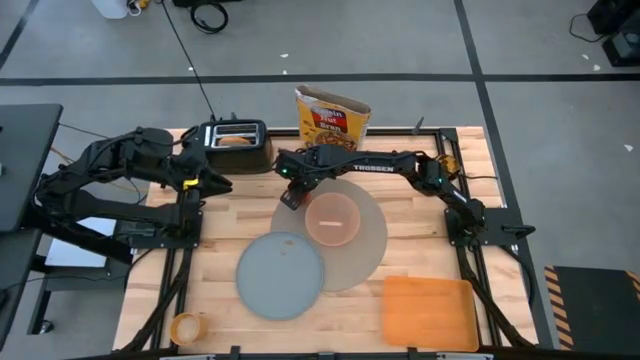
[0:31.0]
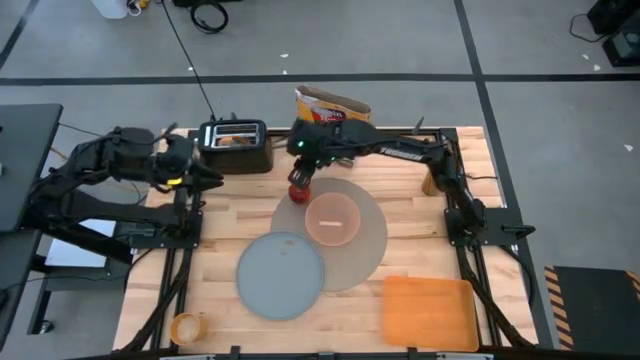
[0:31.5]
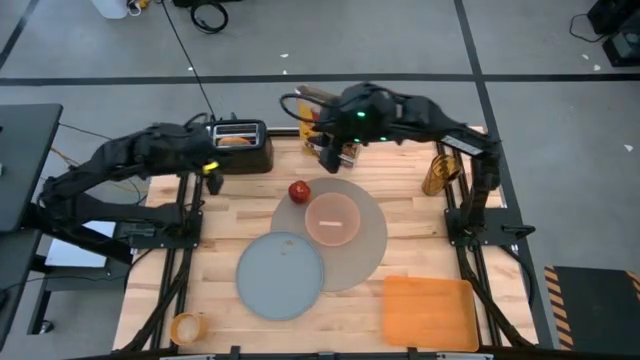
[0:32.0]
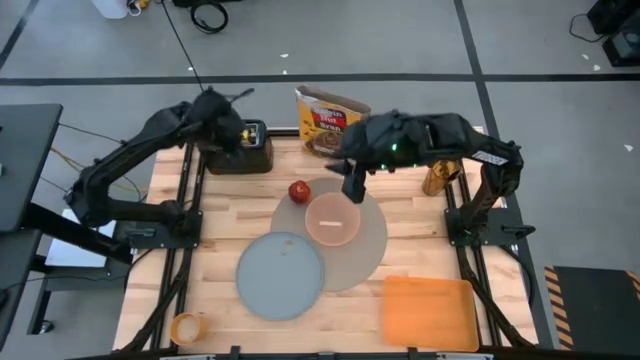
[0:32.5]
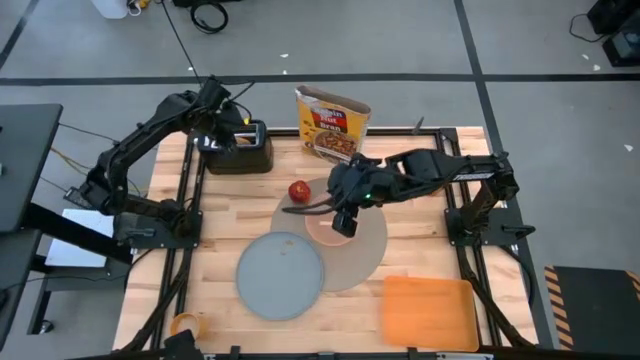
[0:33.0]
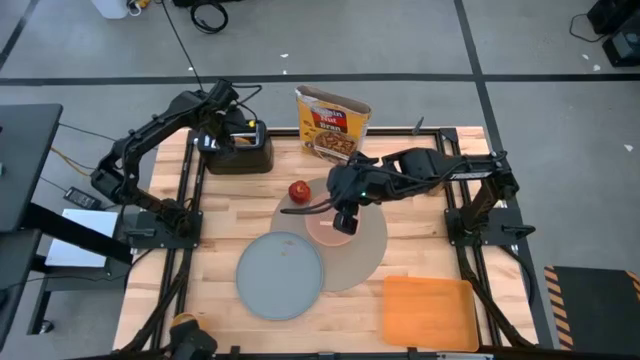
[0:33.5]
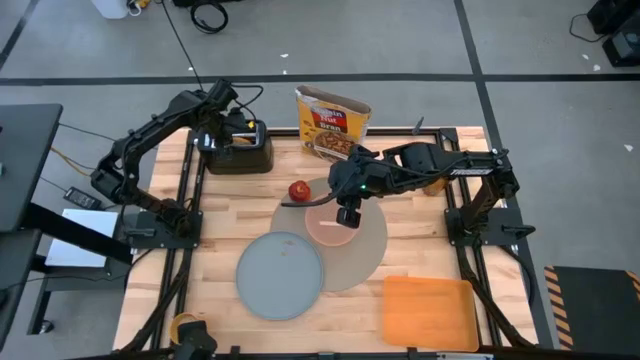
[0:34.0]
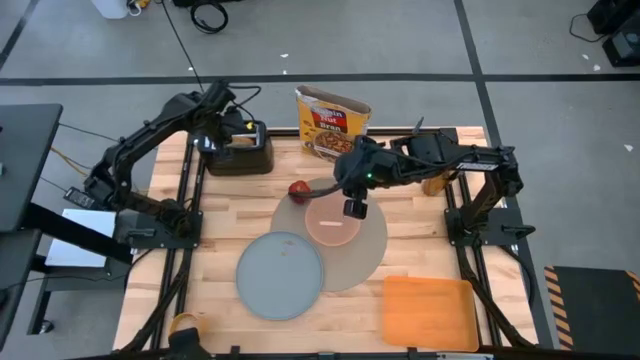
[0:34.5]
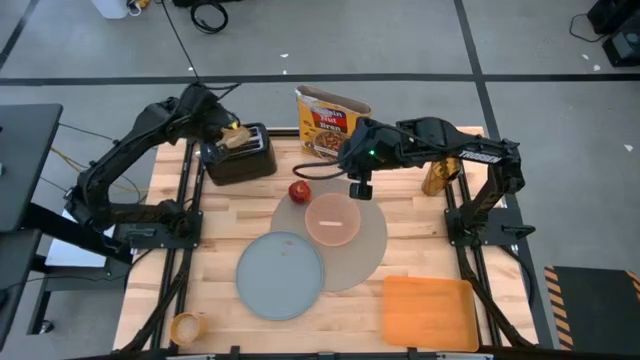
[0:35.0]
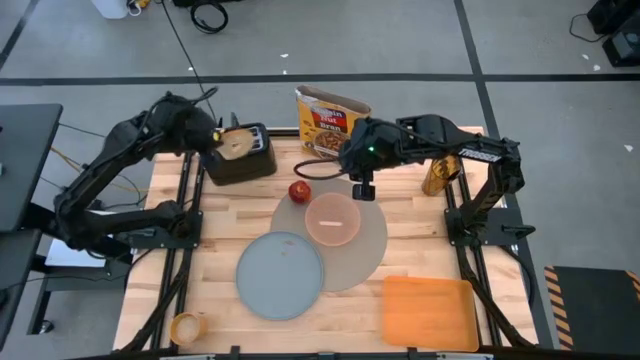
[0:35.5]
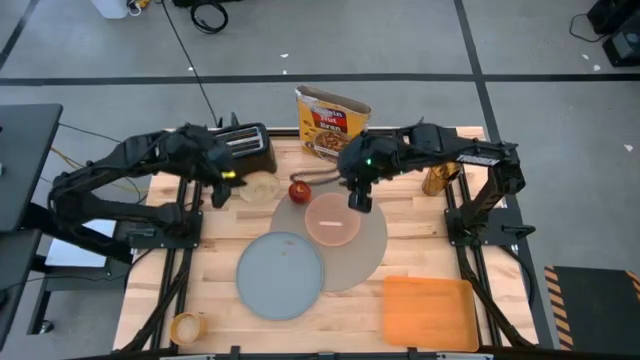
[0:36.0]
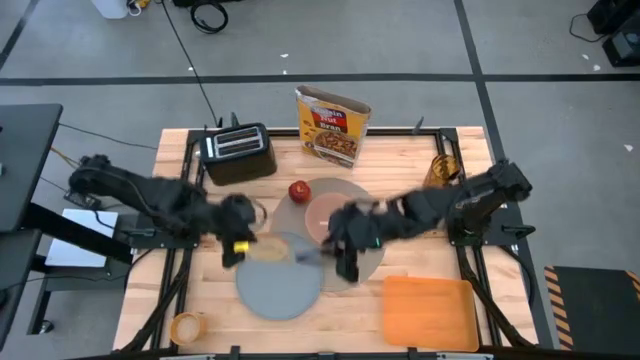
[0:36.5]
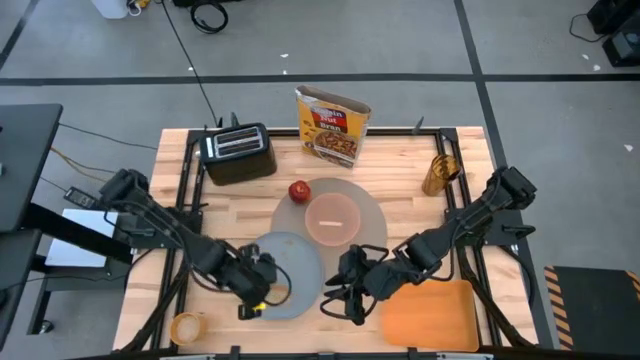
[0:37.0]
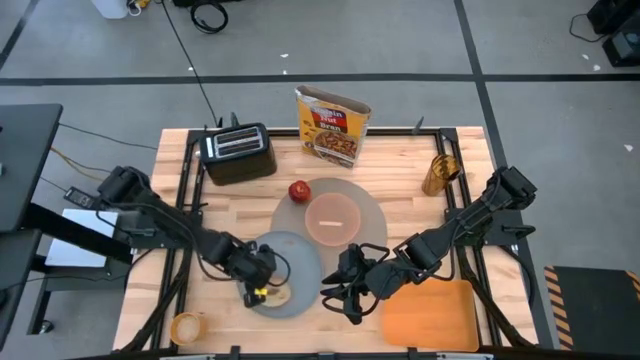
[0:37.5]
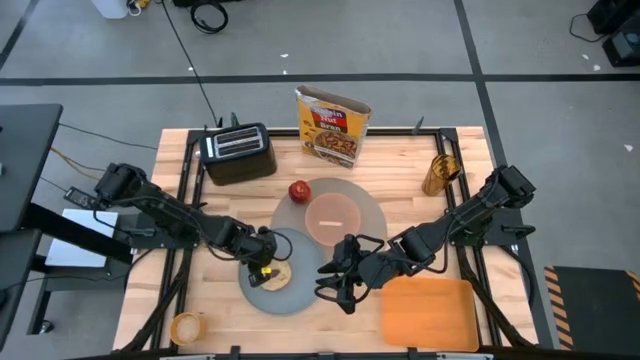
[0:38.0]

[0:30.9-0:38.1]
Task: Arrange a breakfast setting
Put the bagel on the blue plate

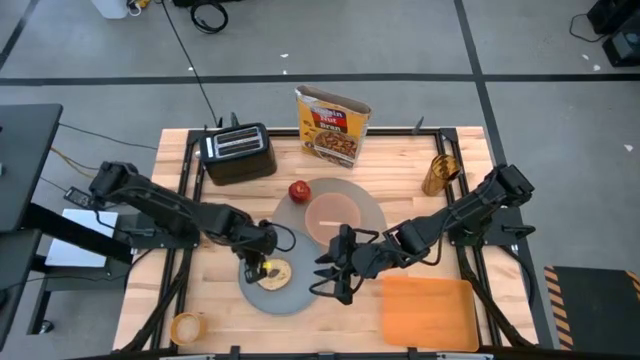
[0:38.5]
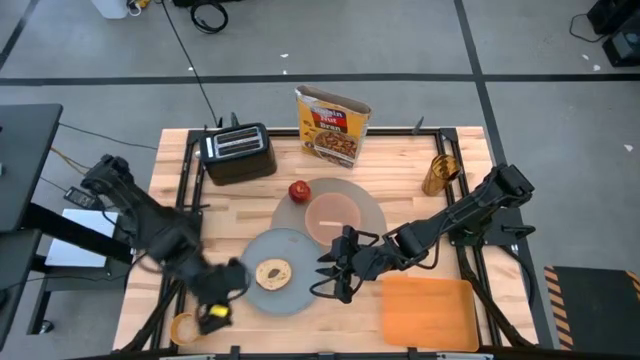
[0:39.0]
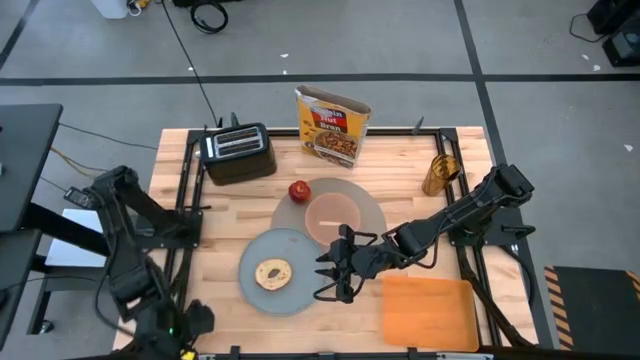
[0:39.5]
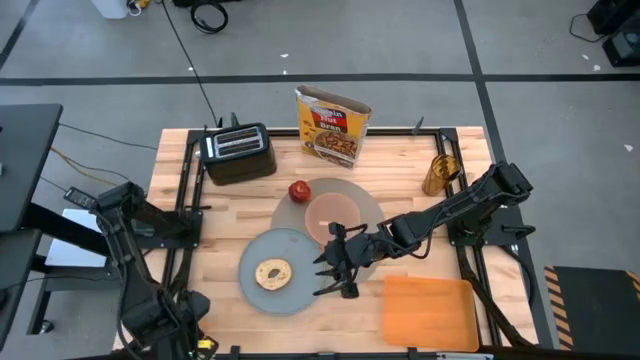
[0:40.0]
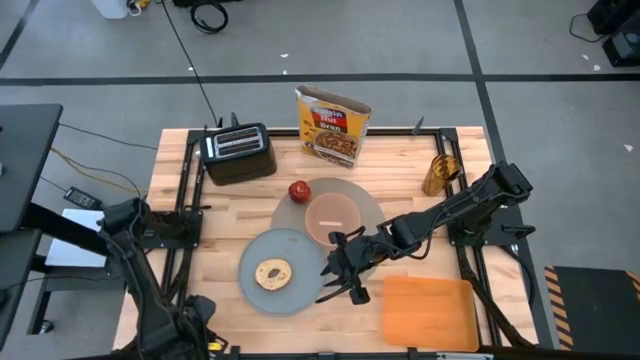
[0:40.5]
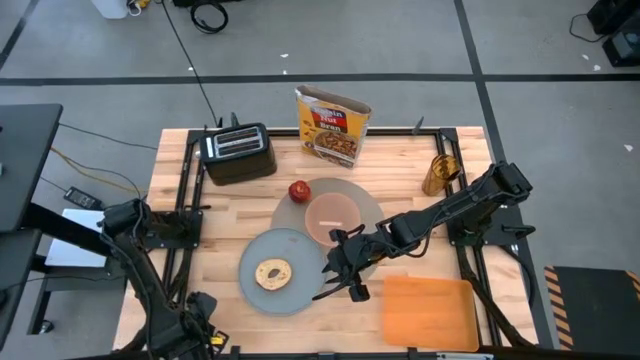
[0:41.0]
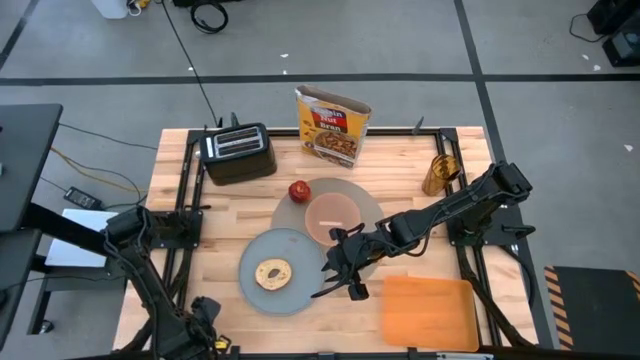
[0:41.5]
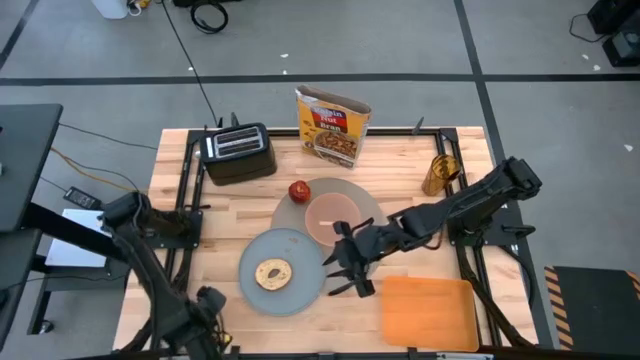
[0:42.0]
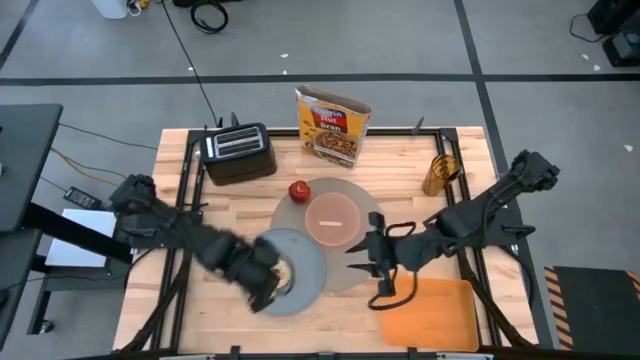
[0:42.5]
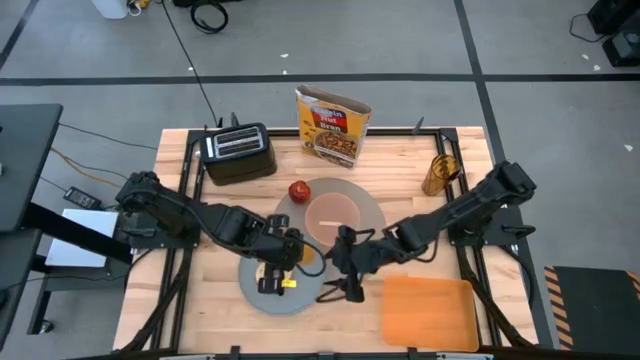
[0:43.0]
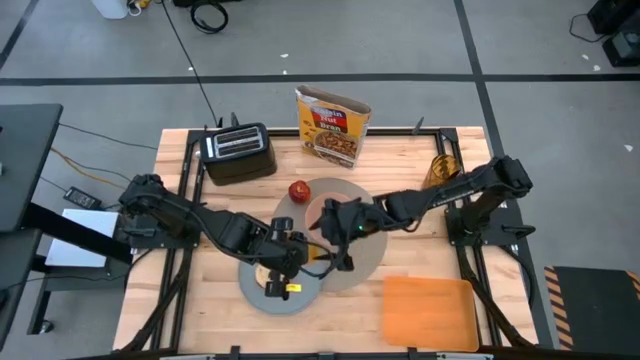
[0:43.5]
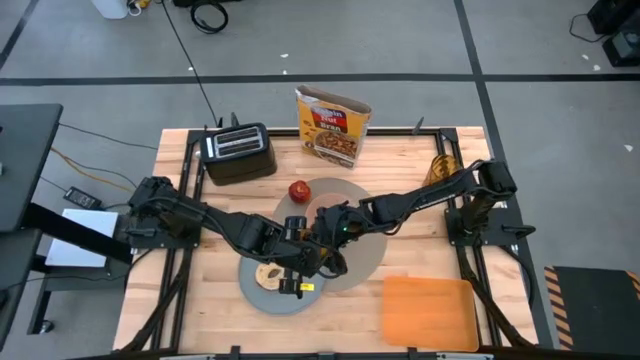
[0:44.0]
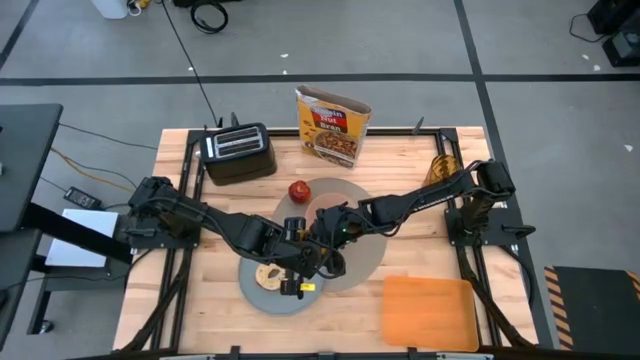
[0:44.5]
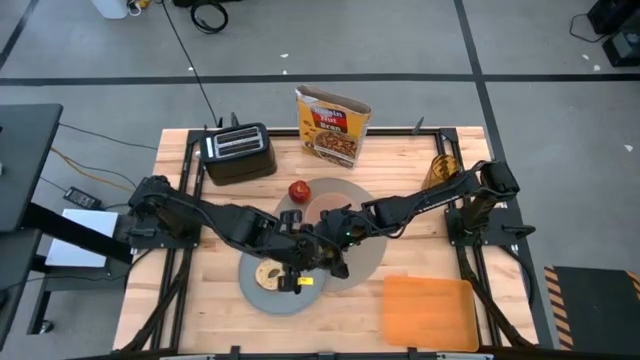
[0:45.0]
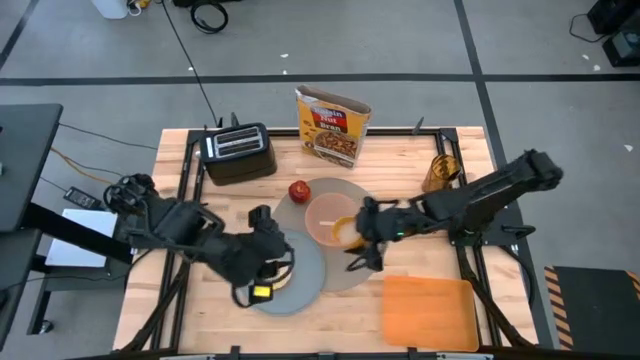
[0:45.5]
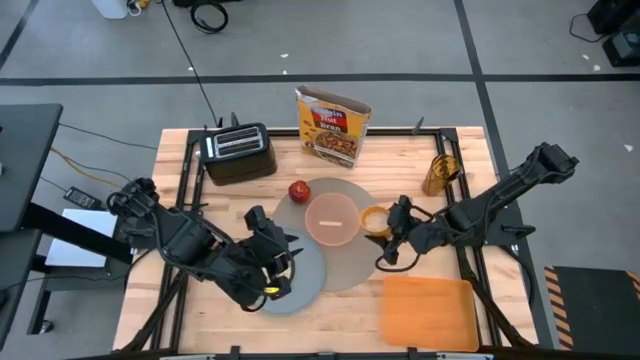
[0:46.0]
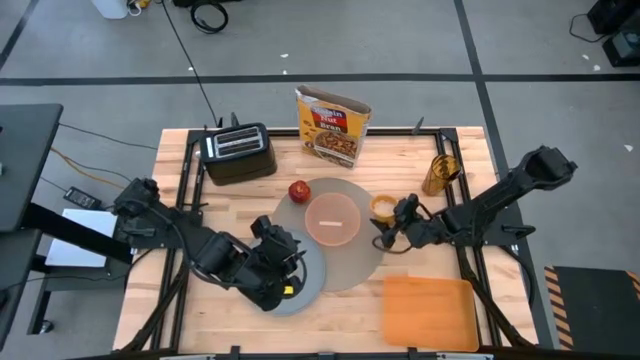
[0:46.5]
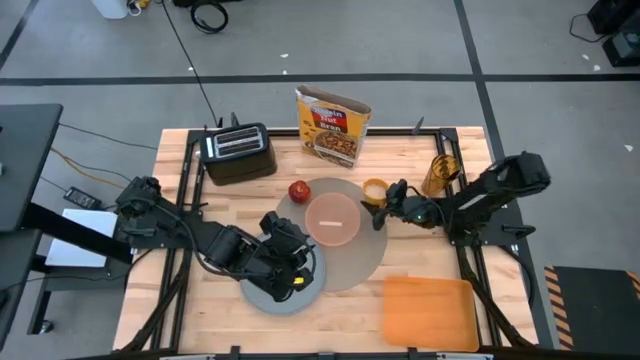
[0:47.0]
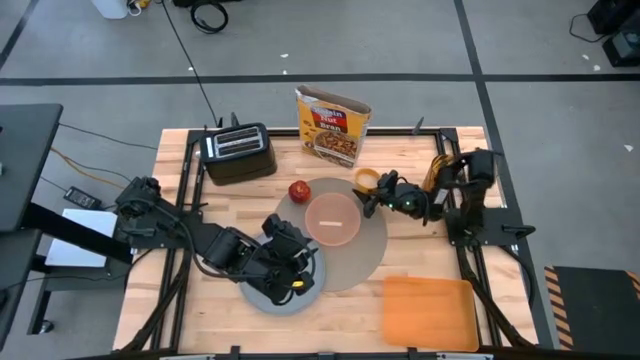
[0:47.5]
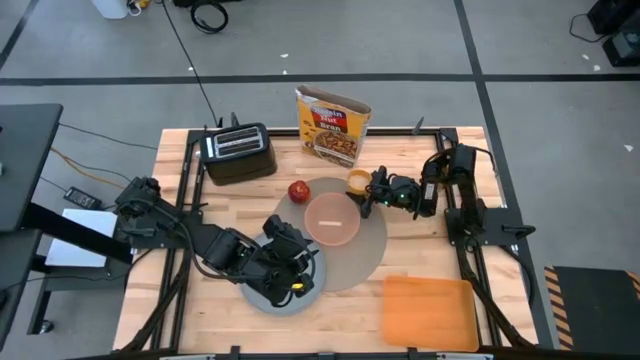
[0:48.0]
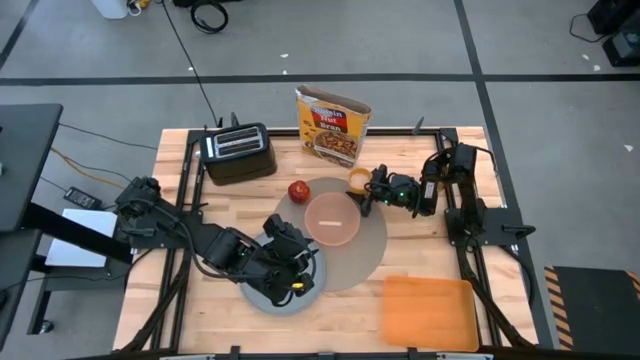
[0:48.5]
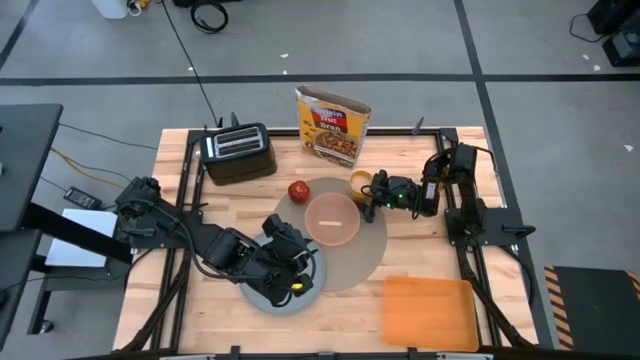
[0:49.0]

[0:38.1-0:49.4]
Put the orange cup on the gray placemat at the top right of the orange bowl

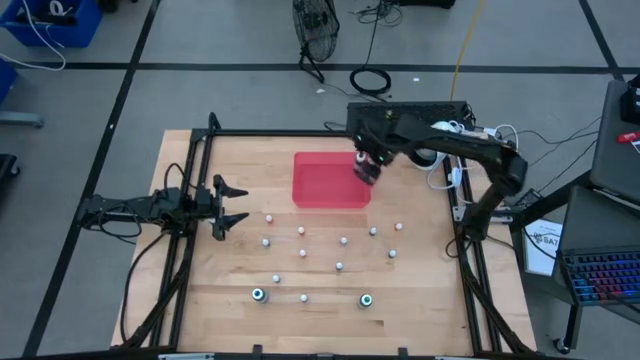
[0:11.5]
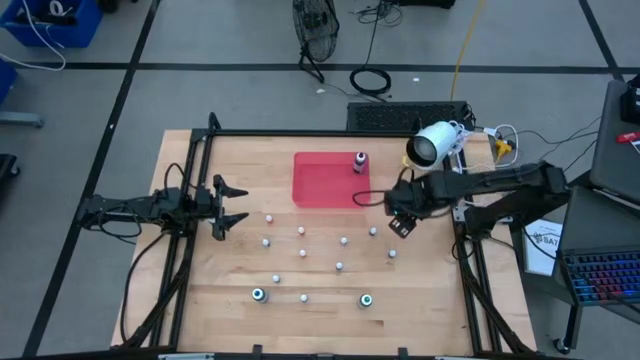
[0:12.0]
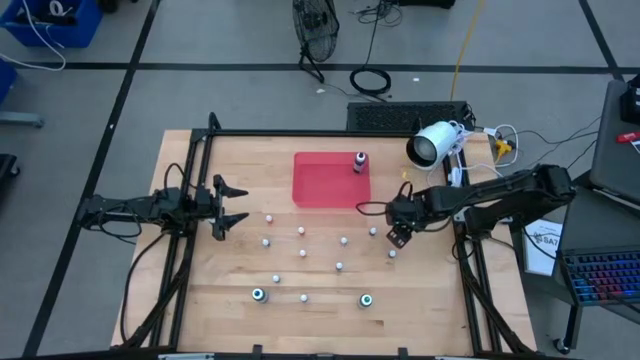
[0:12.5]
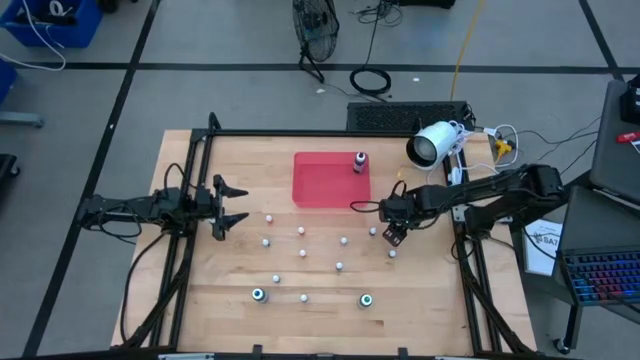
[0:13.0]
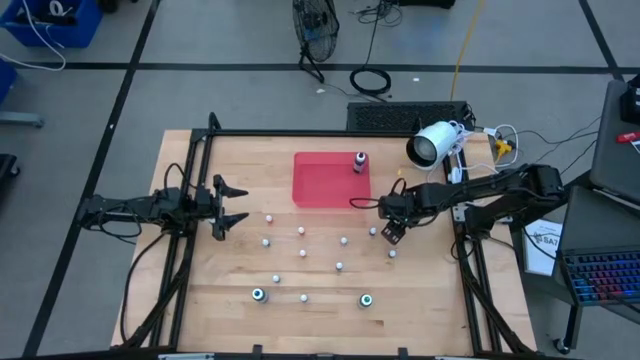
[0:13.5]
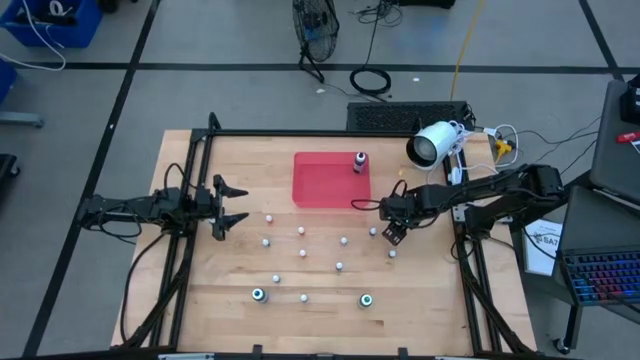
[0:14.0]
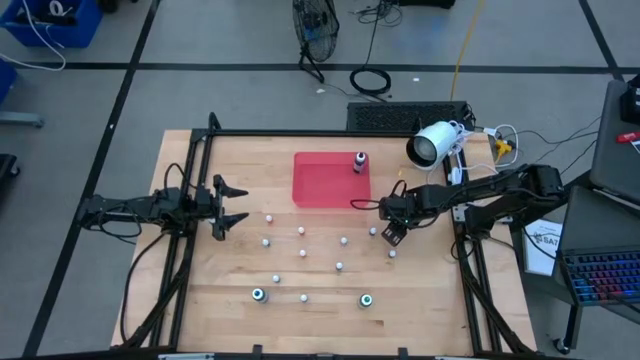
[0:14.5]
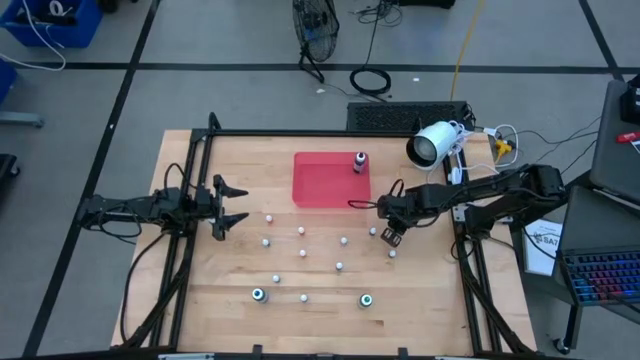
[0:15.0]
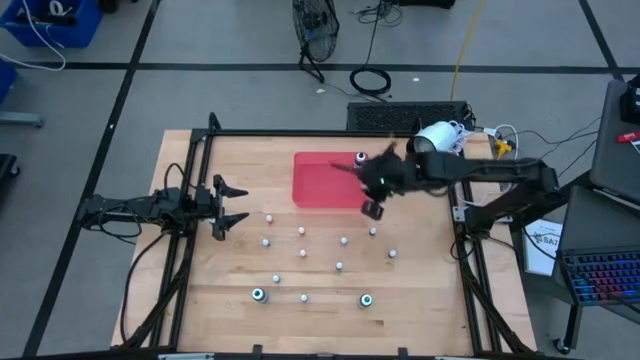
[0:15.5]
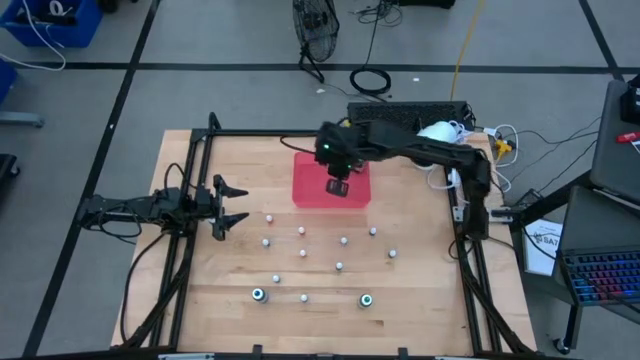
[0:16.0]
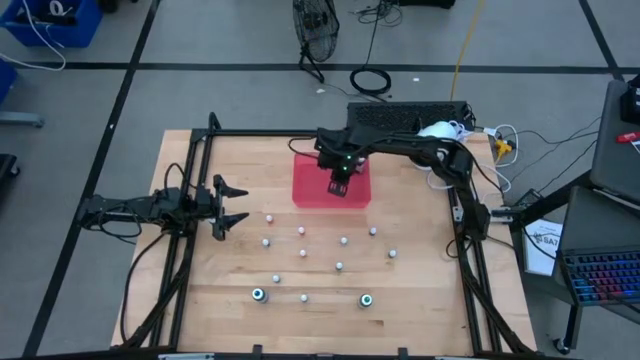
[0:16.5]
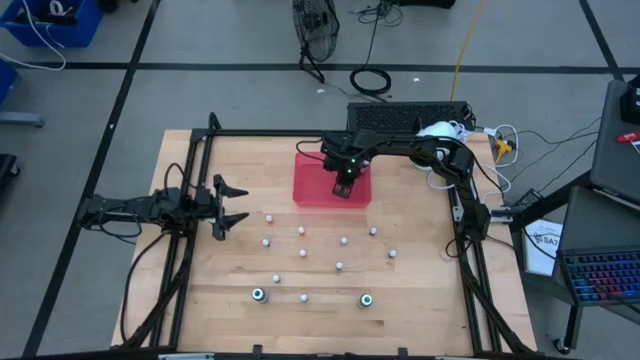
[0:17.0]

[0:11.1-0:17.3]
Task: Pick & Place food coloring
Put the small orange food coloring bottle into the bin
